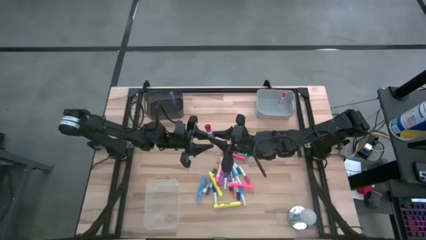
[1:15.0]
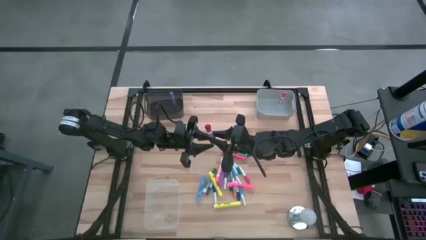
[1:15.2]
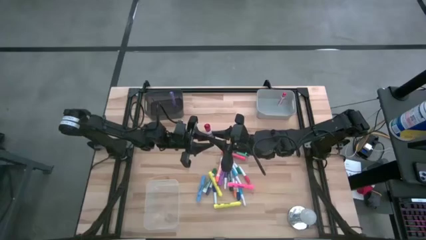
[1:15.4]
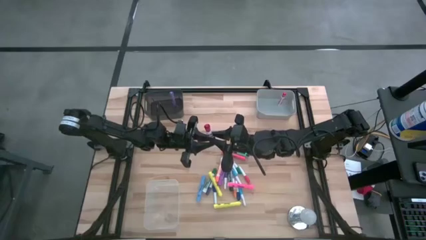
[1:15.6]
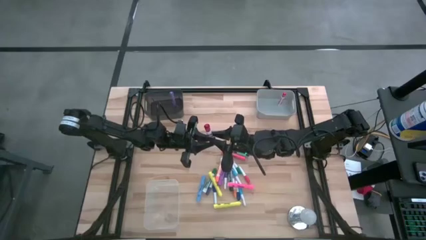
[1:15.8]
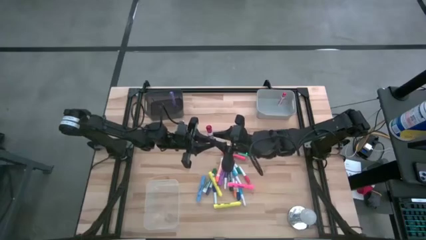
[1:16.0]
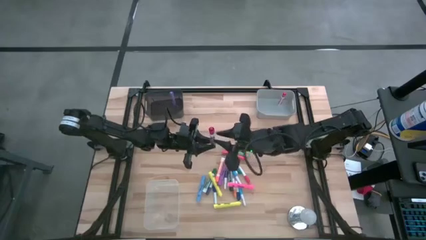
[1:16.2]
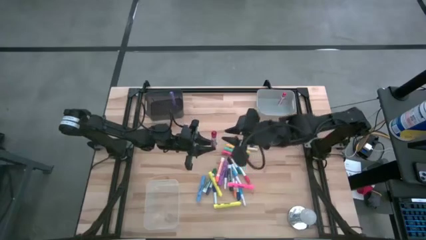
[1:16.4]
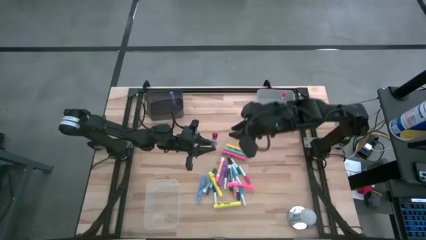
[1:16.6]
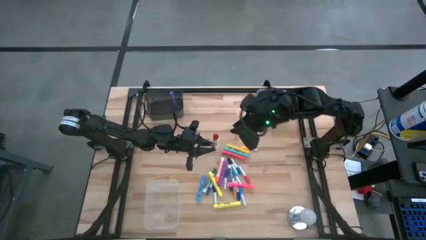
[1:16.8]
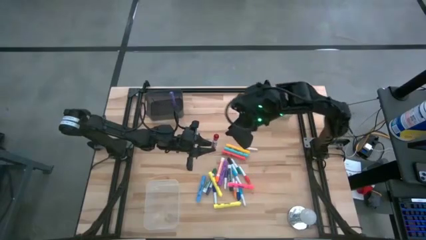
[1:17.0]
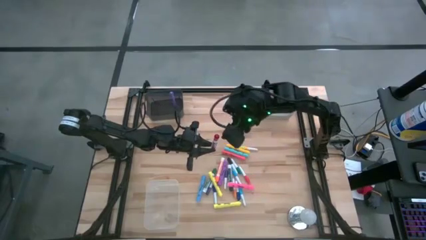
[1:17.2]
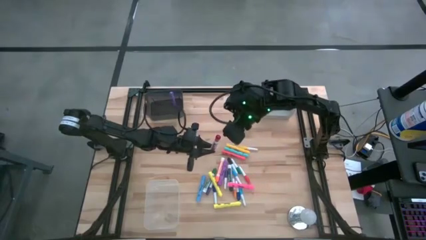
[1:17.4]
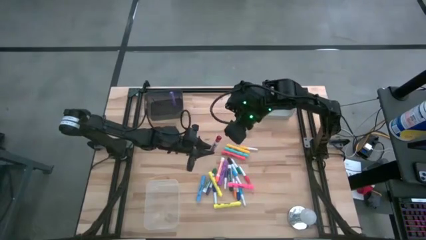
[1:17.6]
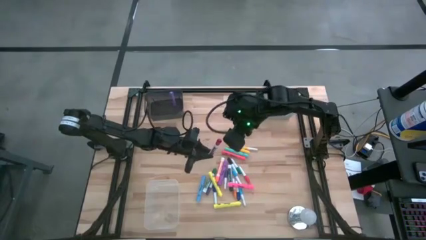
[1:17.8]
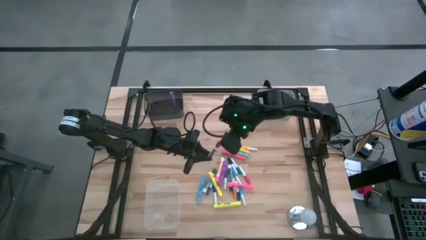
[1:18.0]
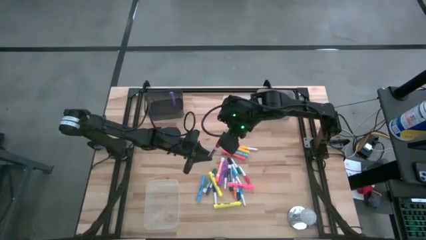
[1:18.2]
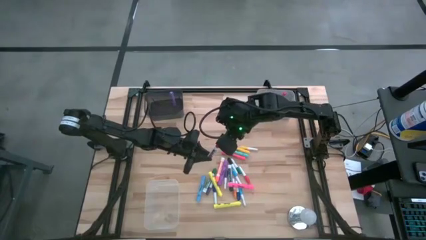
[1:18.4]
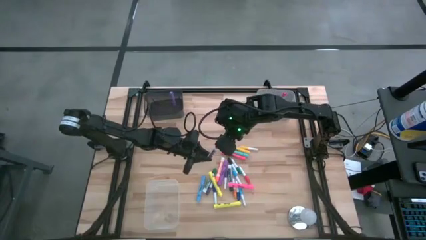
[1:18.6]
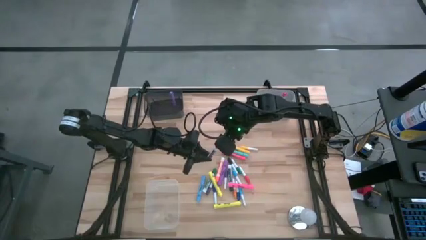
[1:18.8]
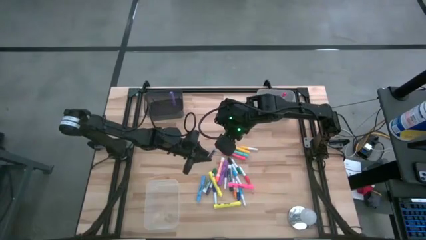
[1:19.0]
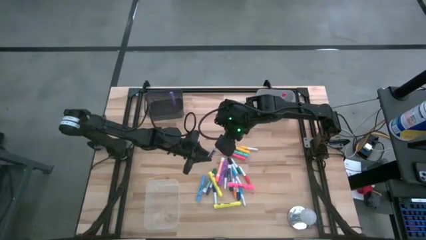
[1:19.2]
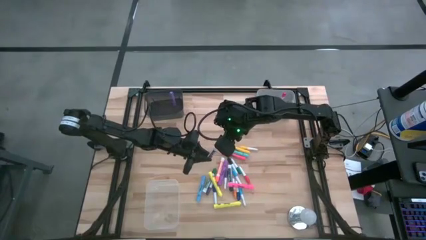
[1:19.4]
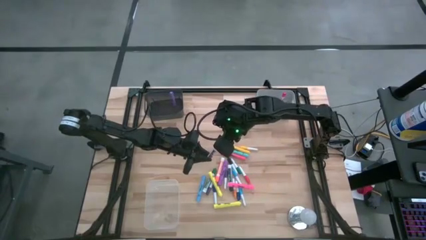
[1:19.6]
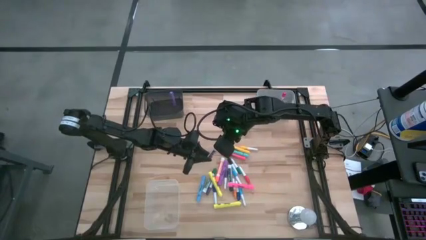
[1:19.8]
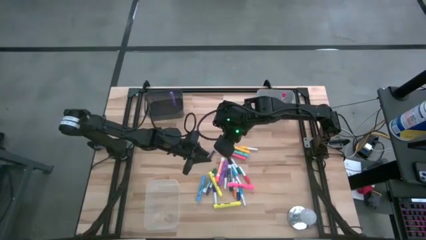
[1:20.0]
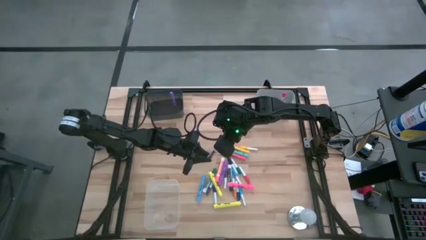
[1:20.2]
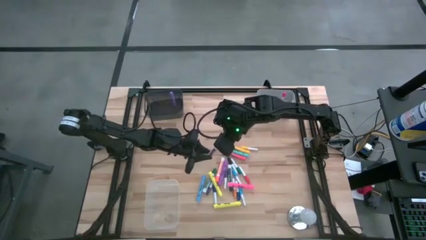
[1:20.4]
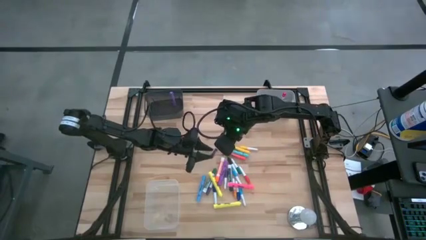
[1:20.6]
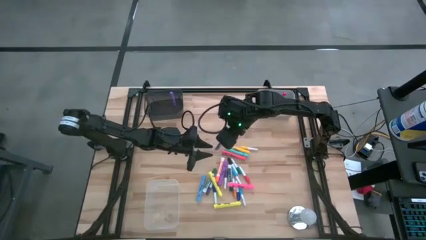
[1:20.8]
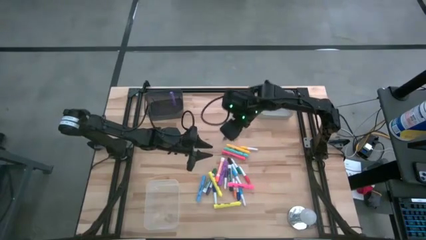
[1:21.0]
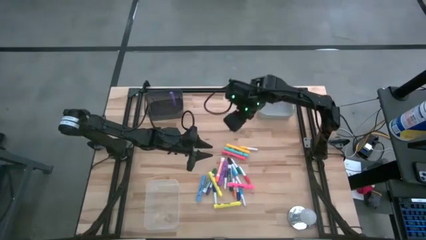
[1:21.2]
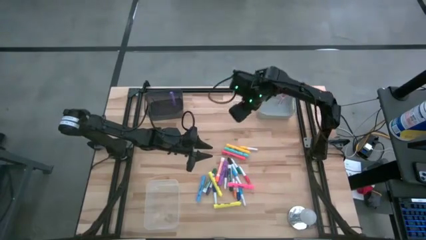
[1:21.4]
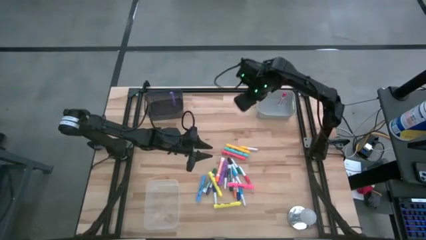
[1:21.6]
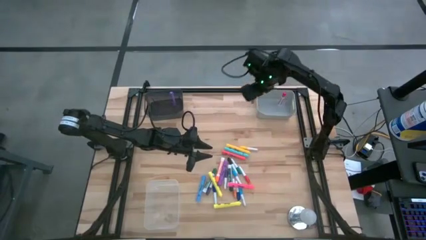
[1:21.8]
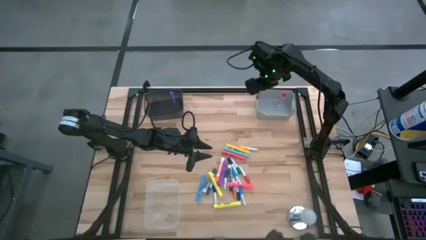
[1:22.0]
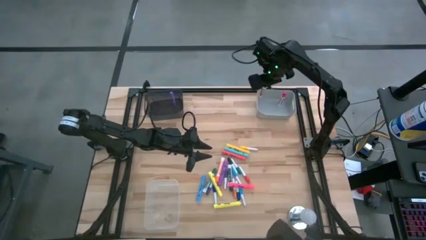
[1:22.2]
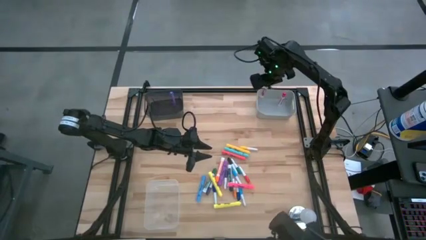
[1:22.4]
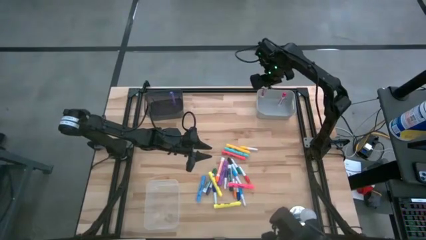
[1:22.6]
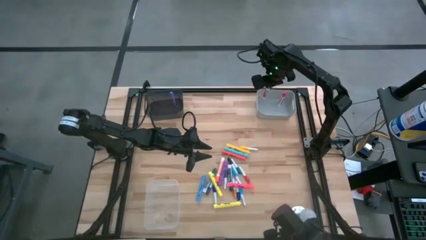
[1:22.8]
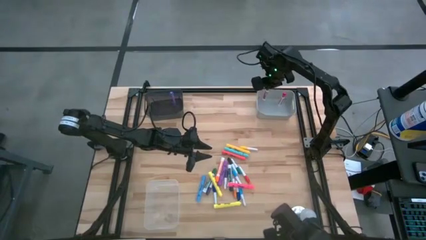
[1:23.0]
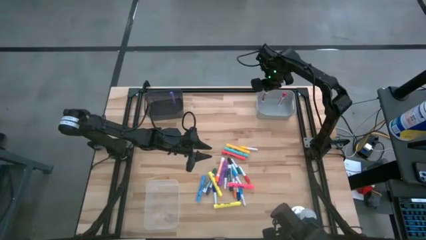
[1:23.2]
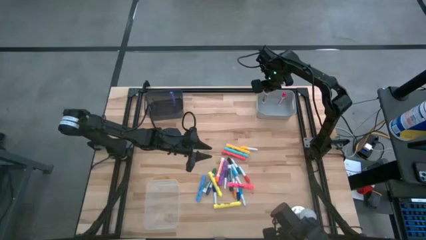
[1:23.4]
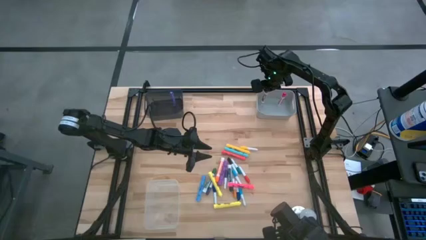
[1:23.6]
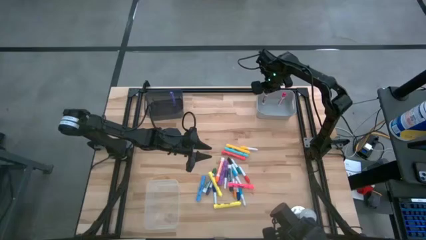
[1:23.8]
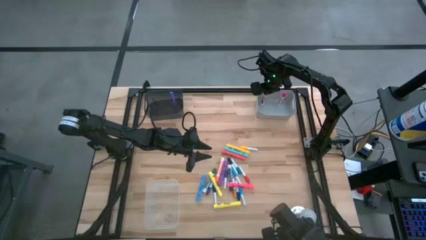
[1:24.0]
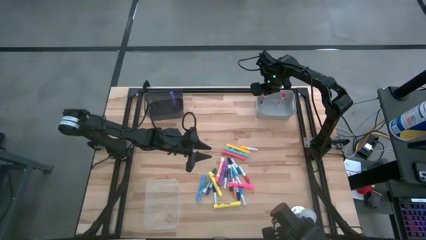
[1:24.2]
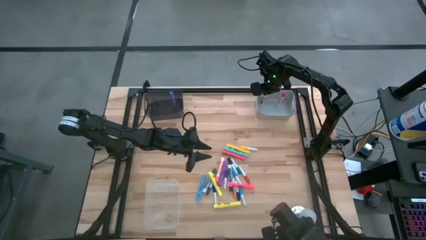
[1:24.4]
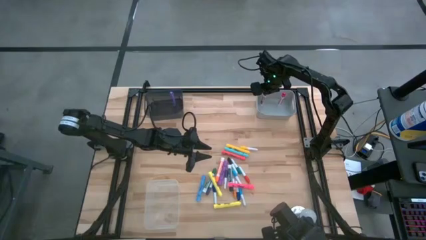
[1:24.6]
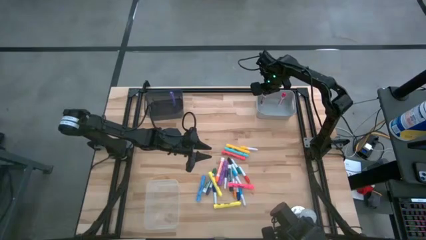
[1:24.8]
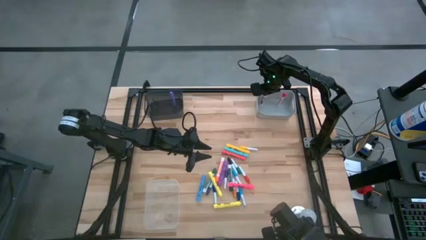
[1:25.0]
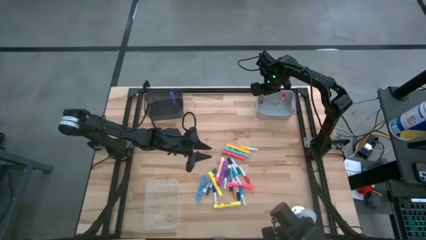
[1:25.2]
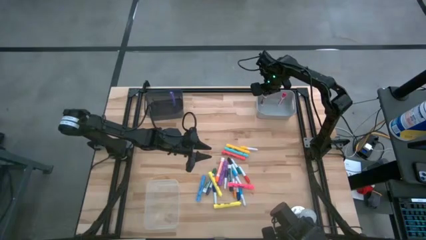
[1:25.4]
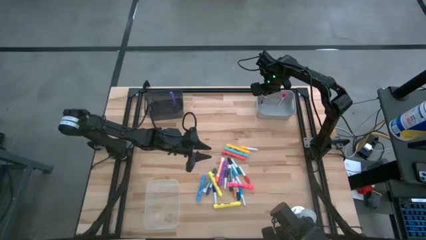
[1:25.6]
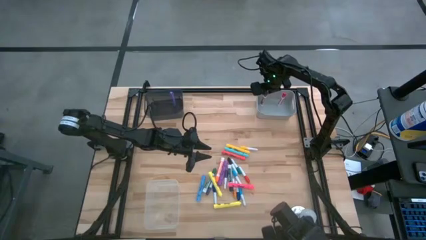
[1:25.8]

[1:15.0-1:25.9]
Task: Pick & Place Markers
Put the red marker pen into the gray bin

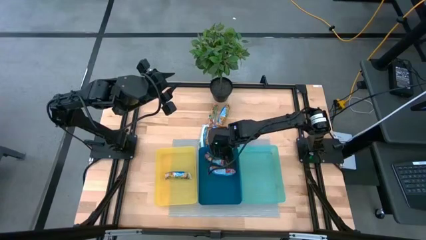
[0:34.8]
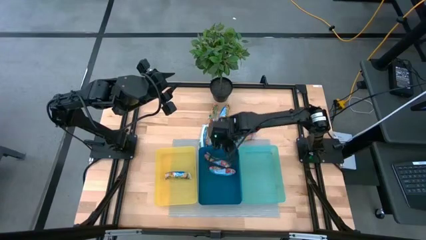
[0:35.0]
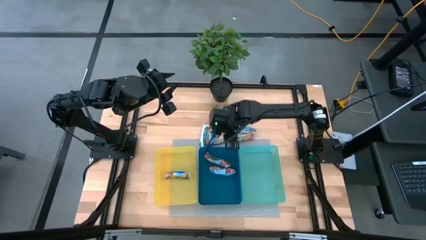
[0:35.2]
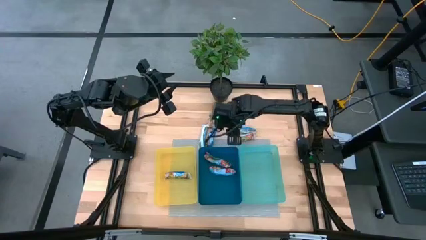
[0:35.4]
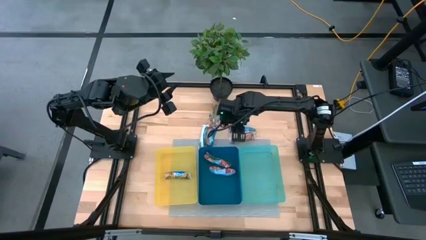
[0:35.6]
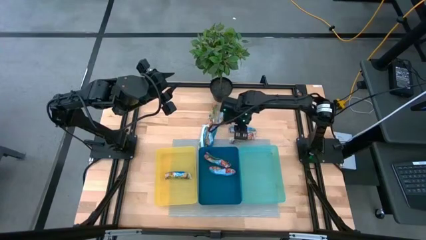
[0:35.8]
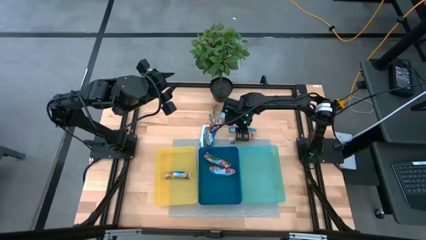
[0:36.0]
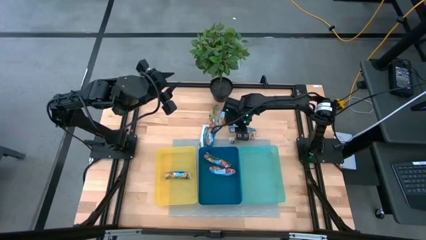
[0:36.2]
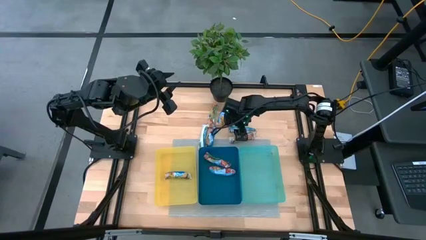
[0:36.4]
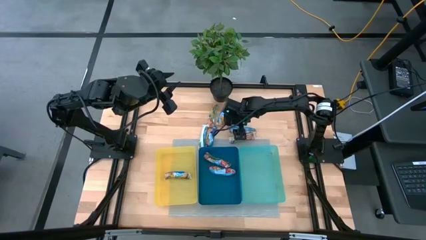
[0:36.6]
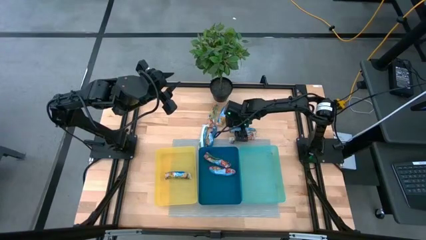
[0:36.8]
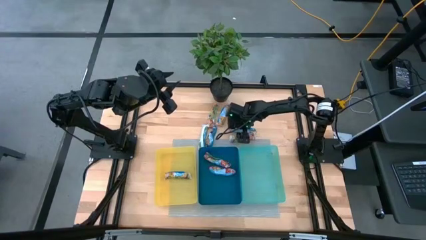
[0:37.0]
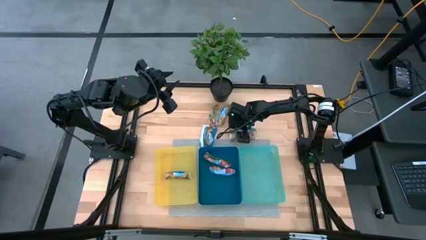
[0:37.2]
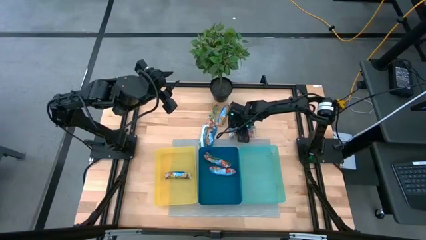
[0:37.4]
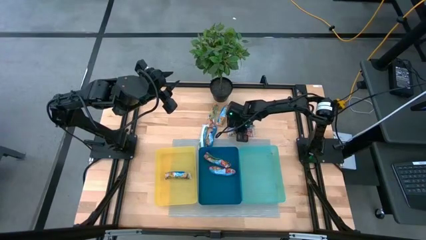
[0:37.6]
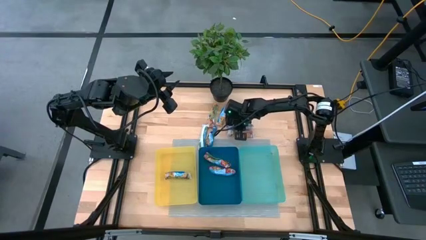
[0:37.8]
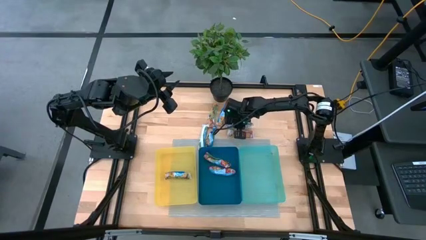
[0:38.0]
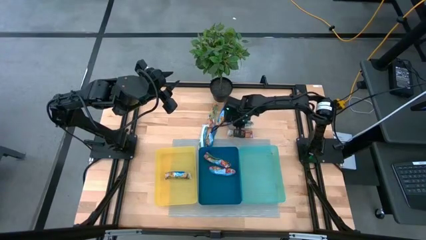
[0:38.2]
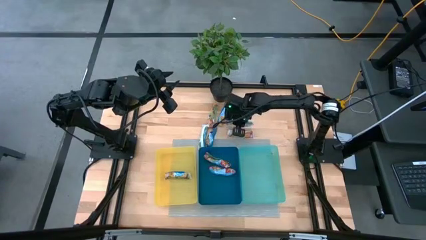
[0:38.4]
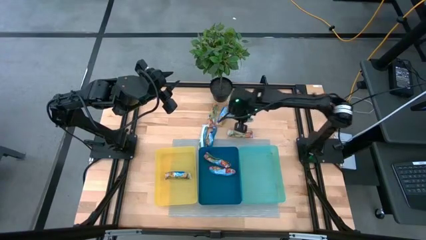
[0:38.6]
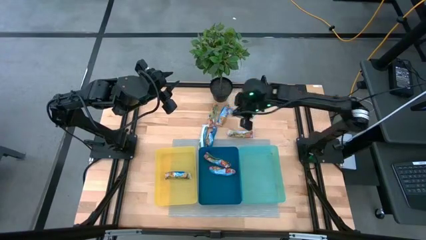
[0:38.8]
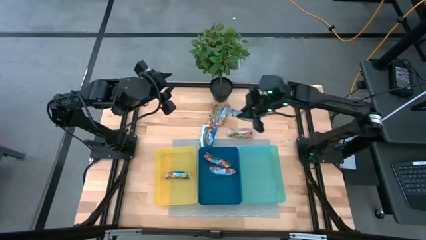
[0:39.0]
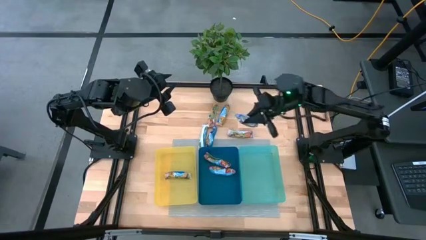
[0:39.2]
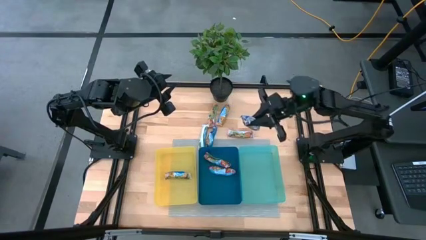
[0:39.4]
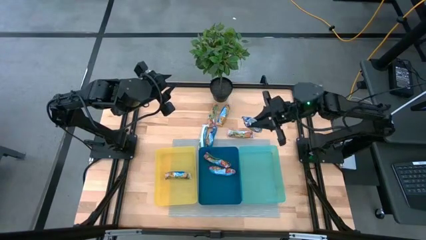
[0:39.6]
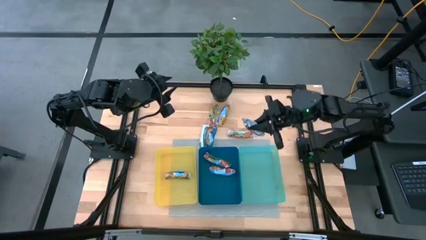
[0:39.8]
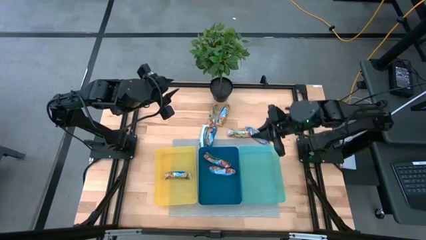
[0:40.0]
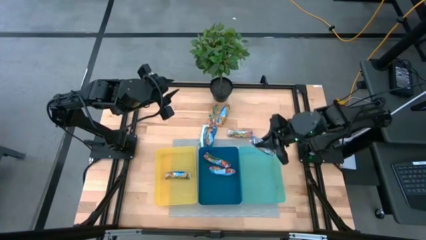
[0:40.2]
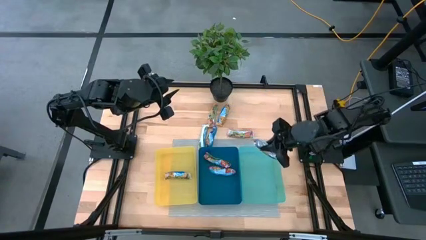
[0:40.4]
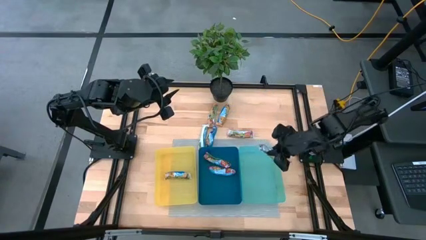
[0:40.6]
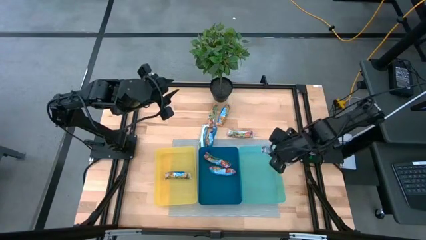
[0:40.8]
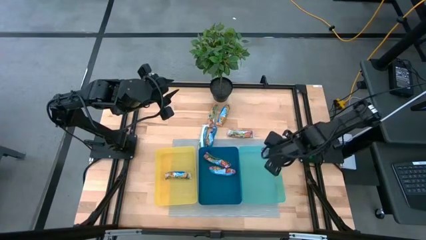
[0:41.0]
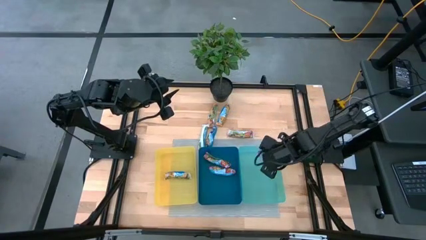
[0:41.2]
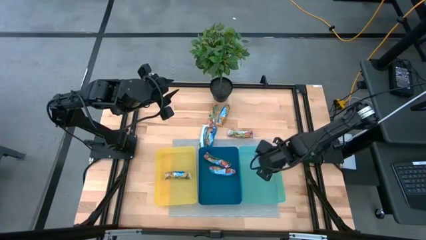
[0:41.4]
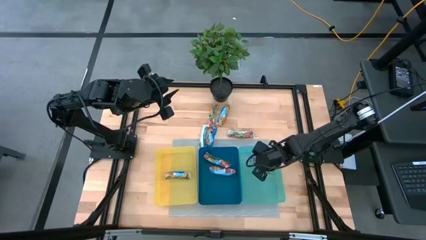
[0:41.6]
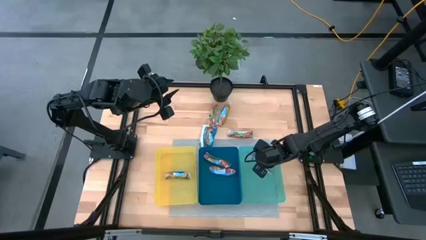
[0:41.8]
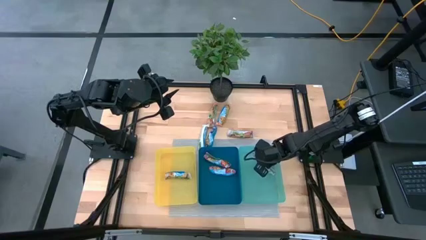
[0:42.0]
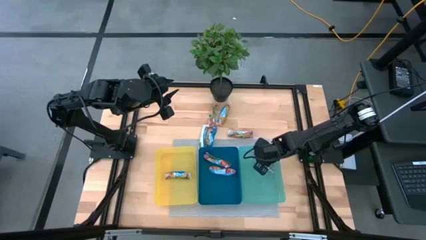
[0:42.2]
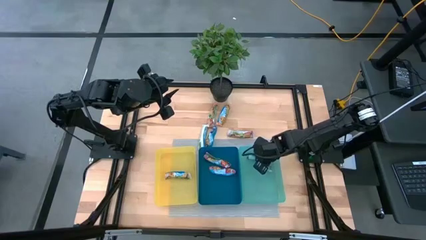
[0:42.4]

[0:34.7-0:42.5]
Task: Pick and place Granola Bars by type
Put the blue granola bar into the light blue bin
